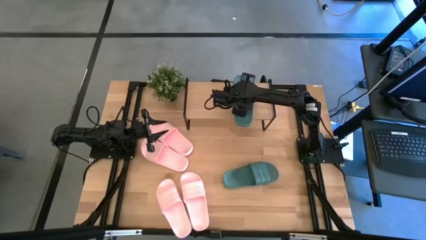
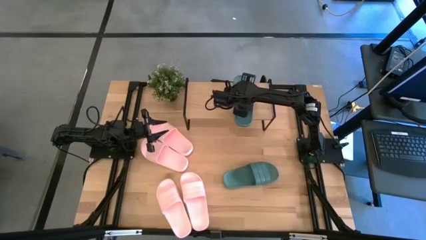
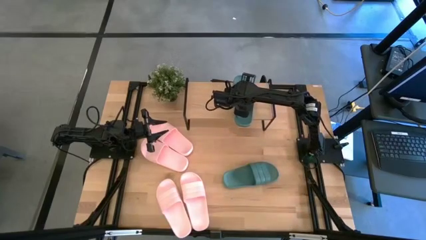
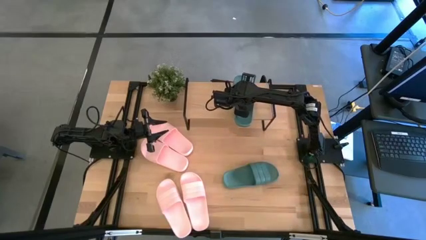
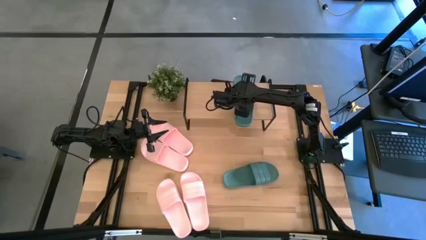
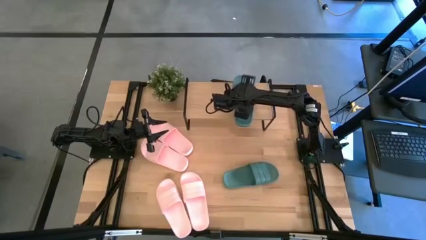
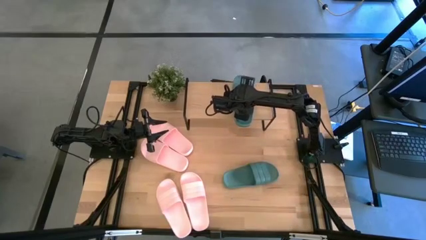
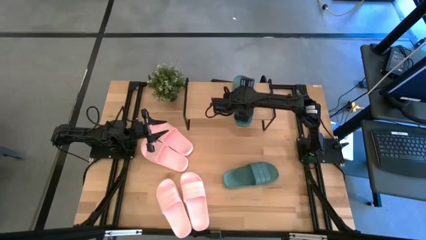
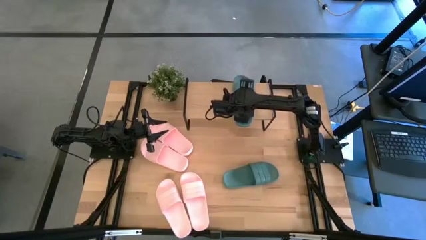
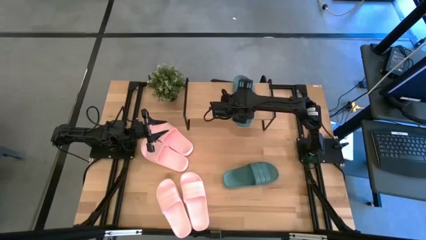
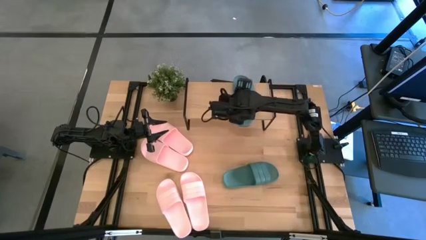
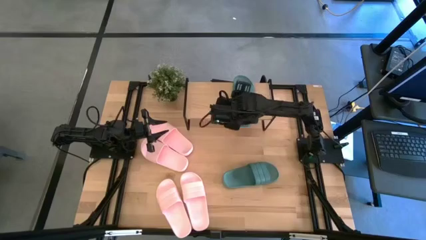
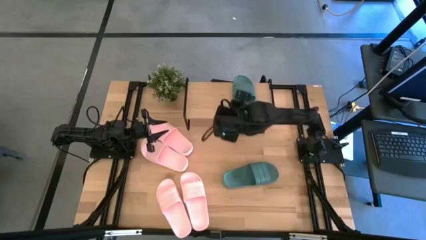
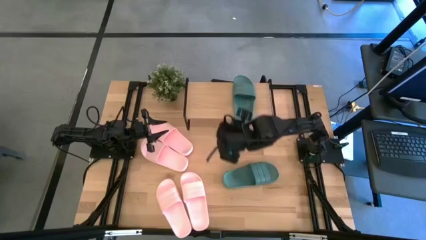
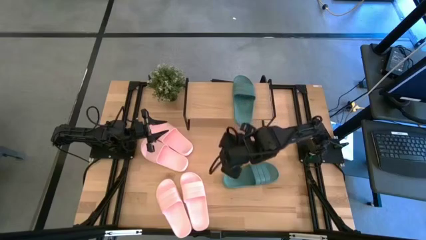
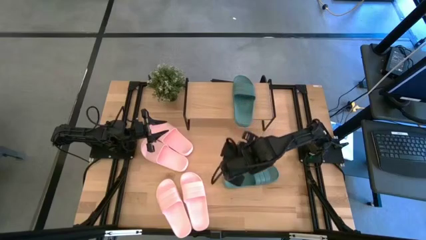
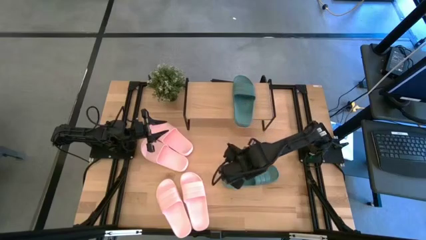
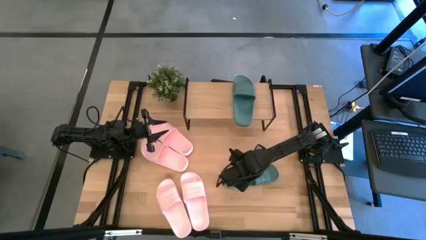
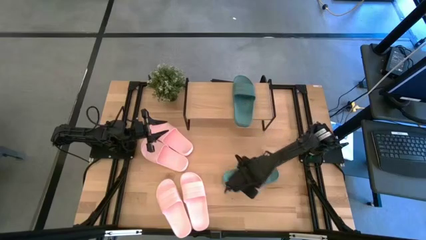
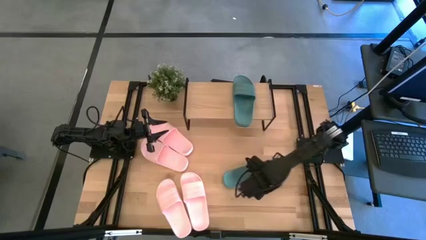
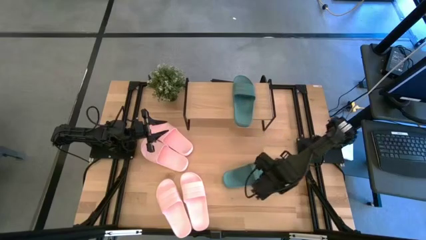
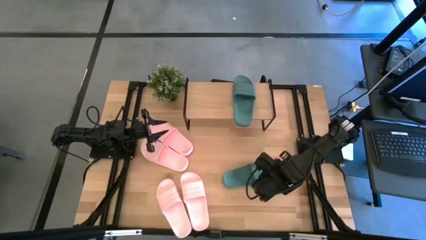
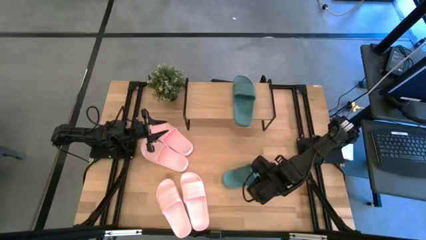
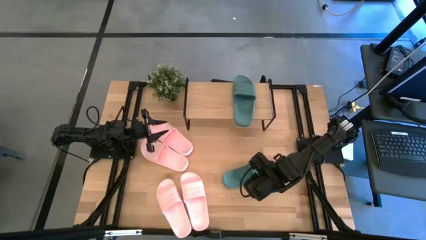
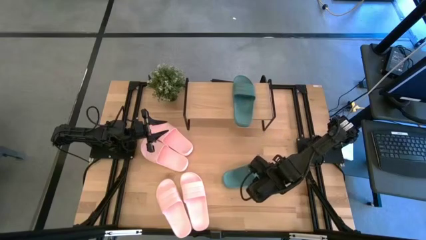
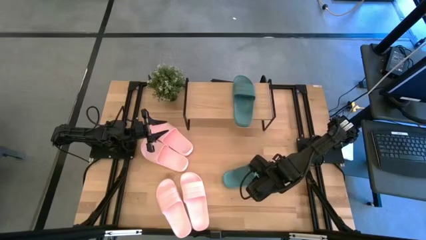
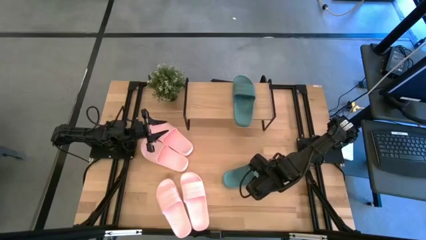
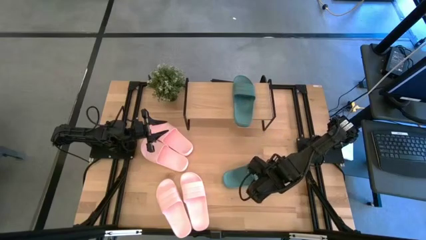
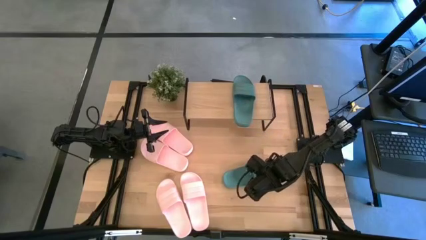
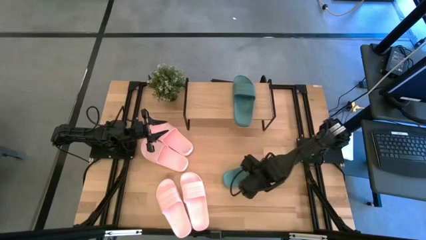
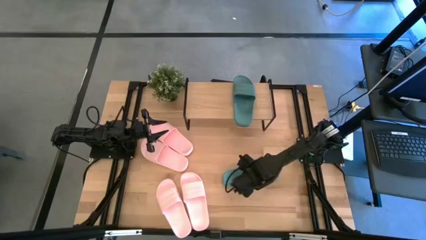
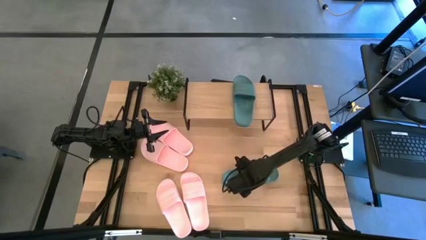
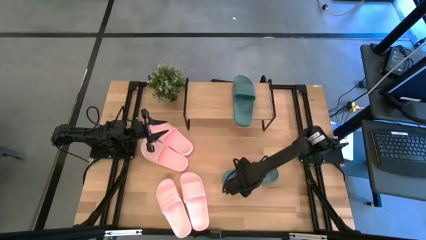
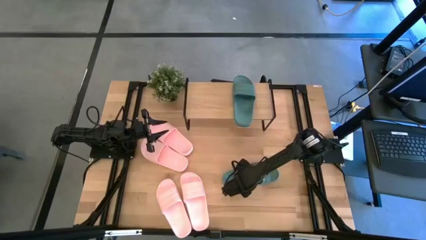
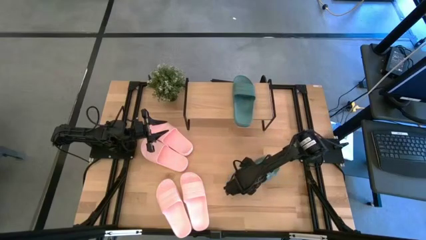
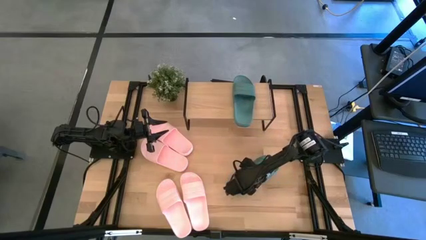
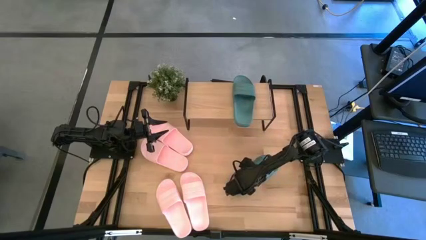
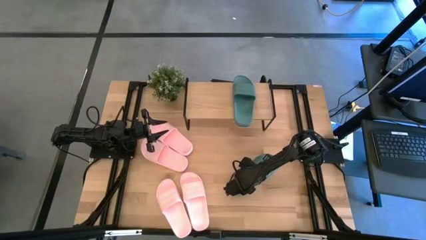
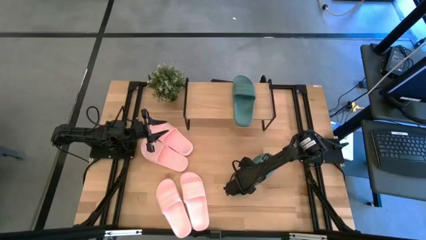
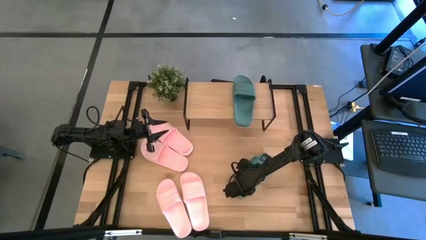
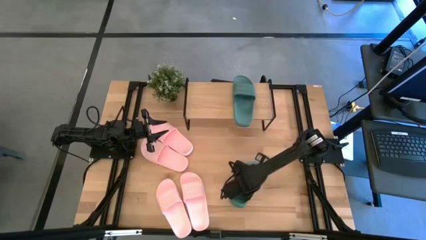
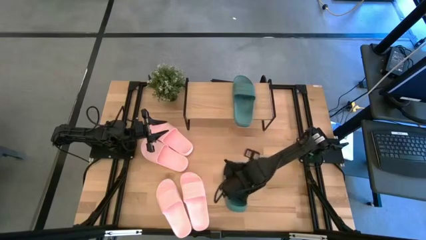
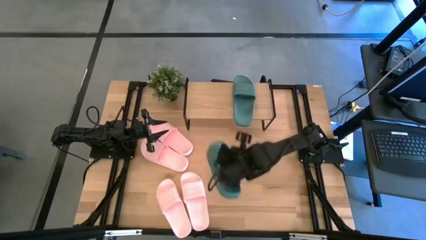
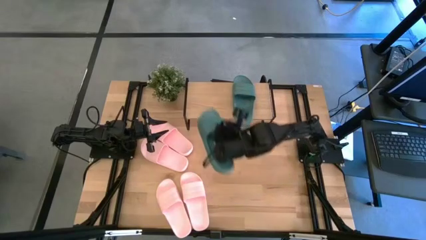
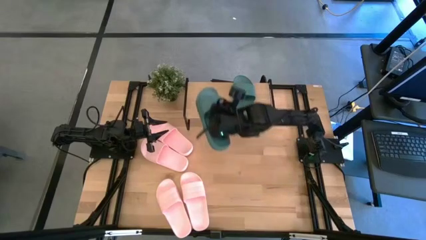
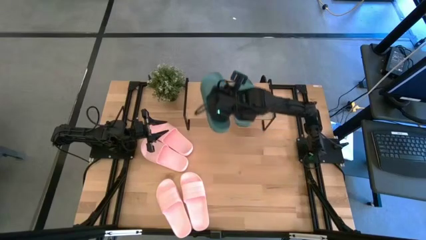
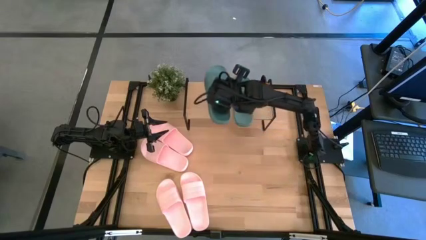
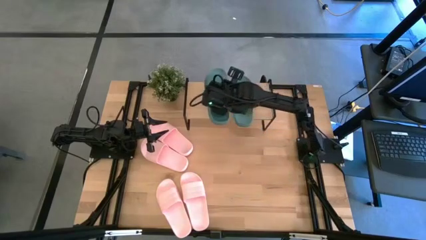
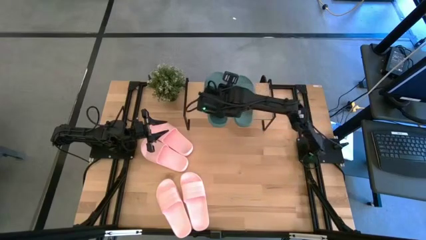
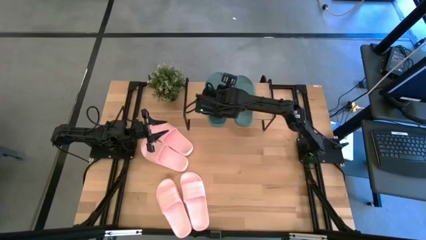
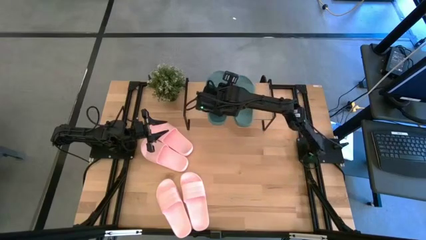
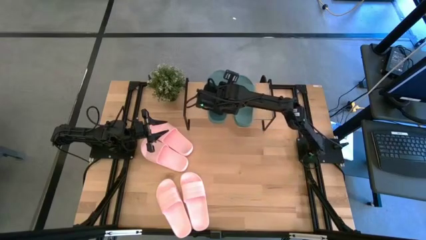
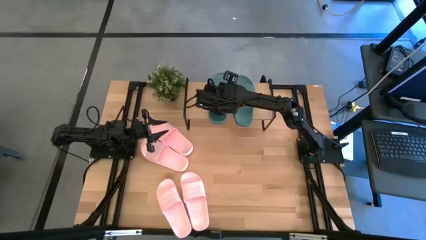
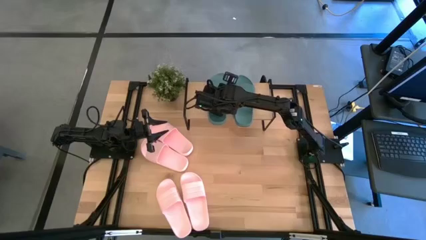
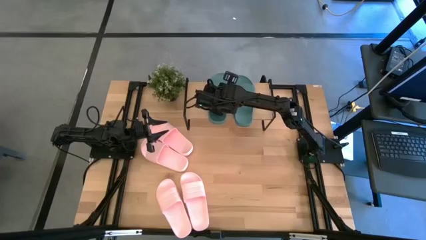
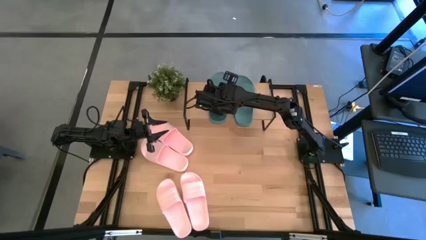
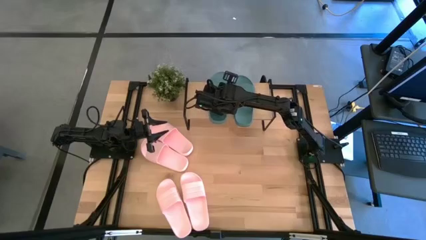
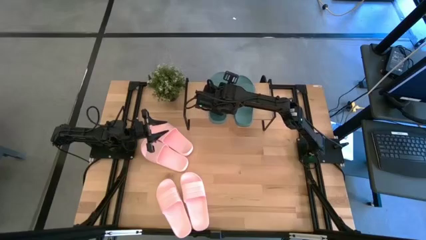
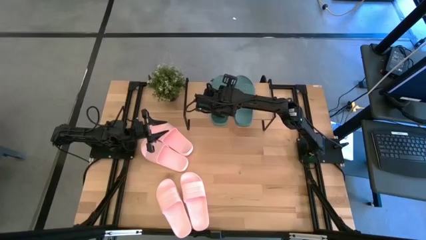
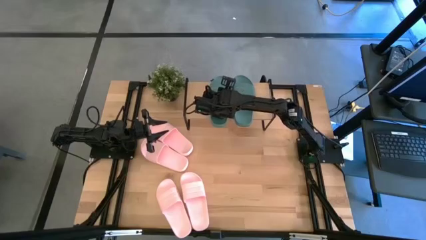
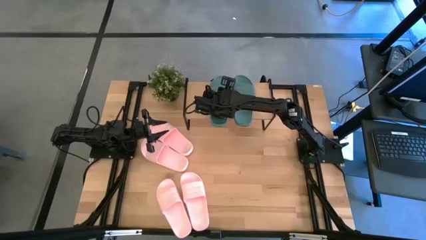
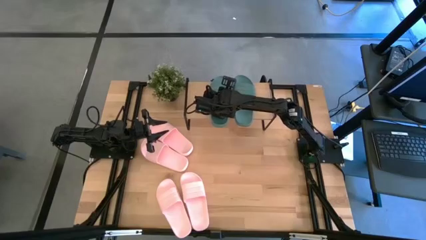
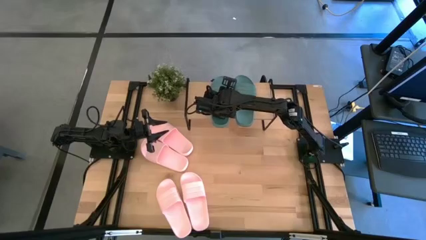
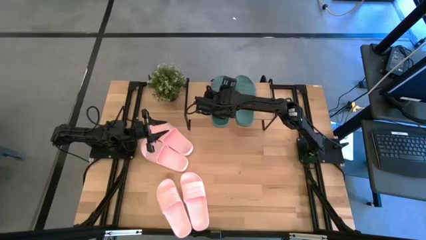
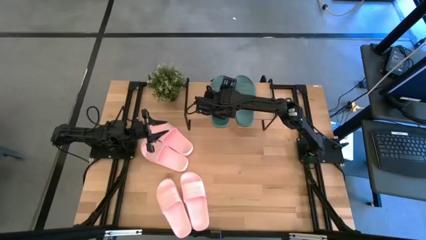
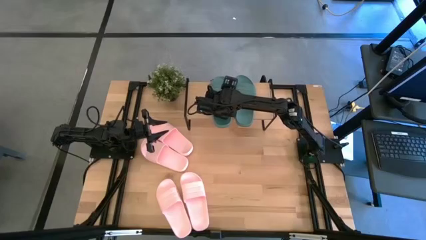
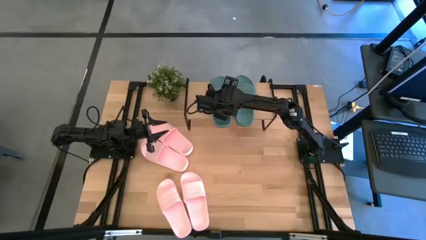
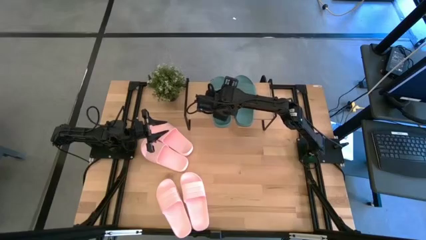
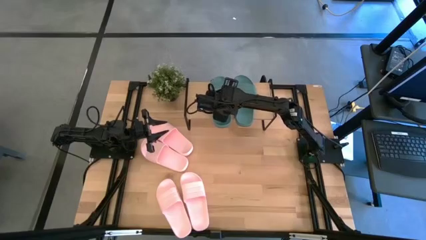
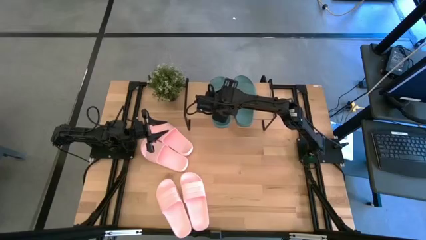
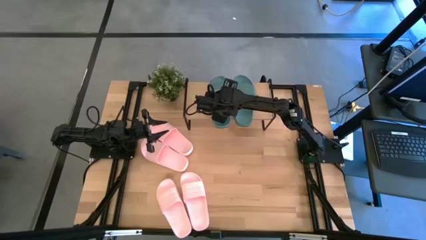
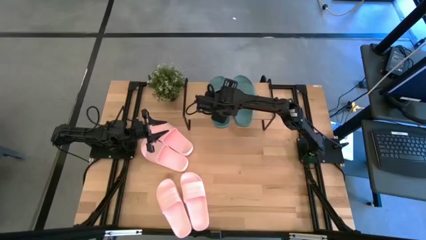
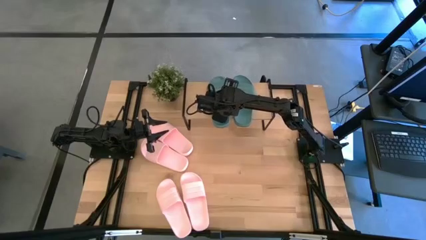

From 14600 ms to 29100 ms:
Task: Pick and place slides into the shelf
Put the green slipper on the shelf
